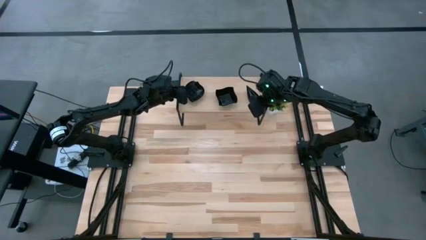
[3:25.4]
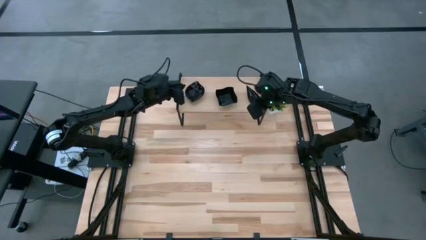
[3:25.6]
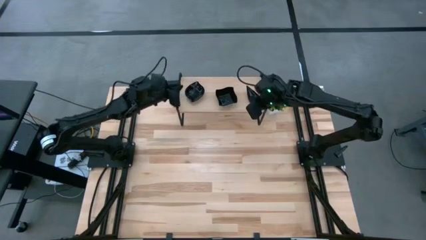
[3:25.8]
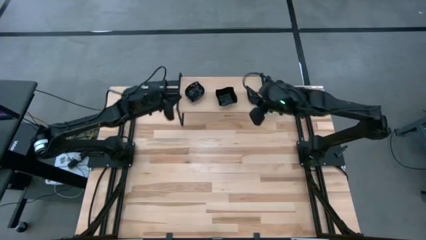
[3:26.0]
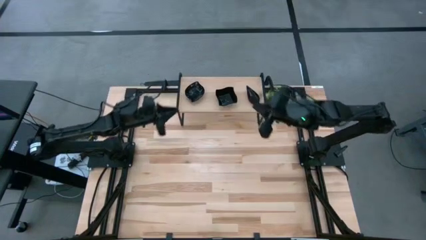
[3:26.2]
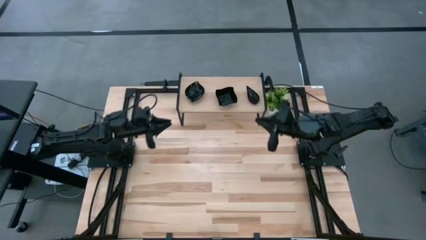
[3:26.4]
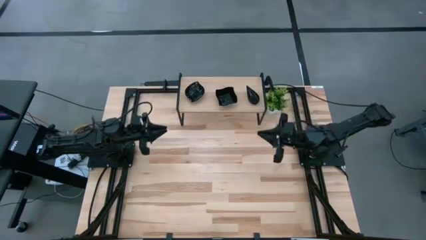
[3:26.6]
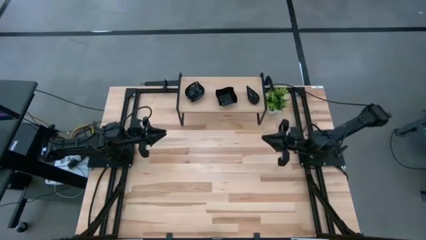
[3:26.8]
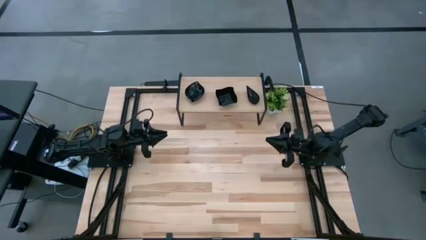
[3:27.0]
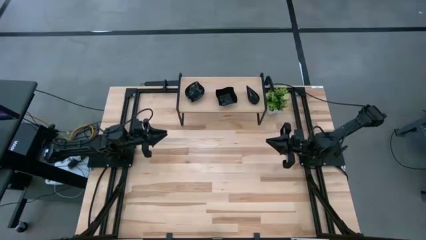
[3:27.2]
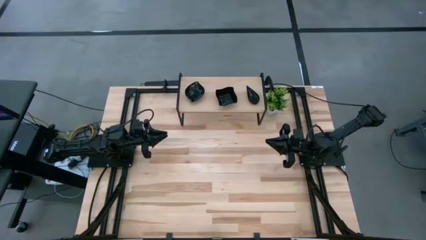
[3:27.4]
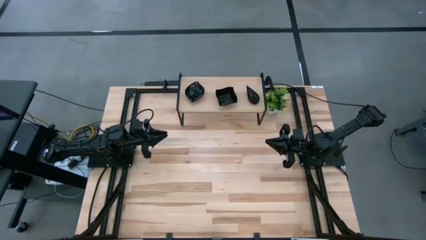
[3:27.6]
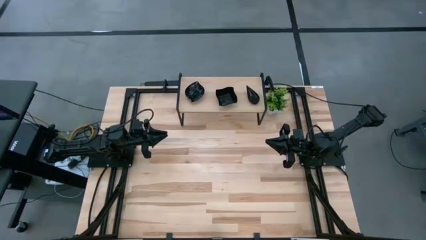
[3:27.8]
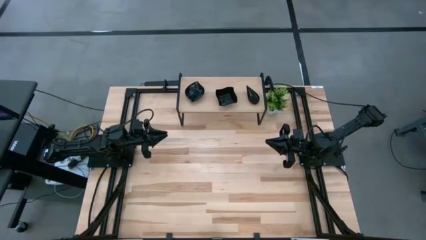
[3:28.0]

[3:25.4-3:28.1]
Task: Pick & Place Mini shaped plates
Return to Home Position

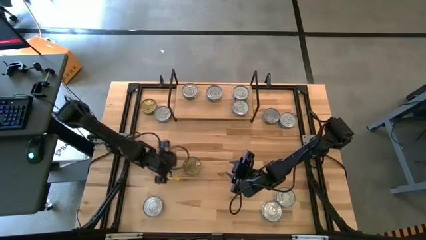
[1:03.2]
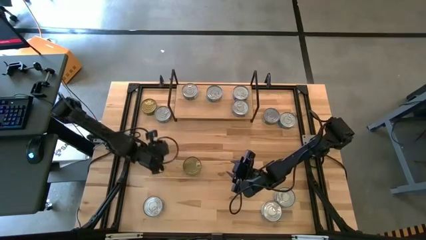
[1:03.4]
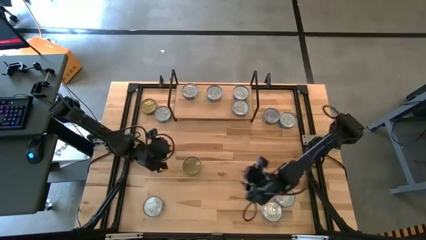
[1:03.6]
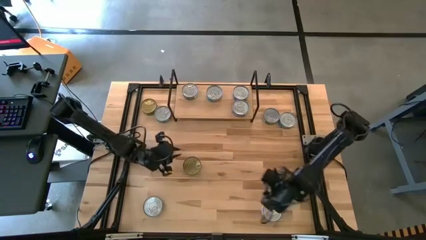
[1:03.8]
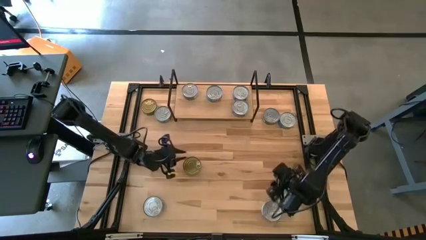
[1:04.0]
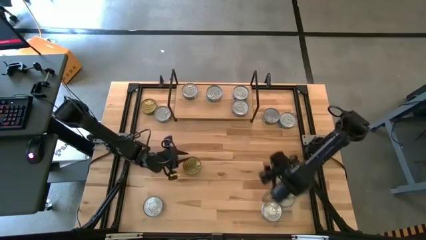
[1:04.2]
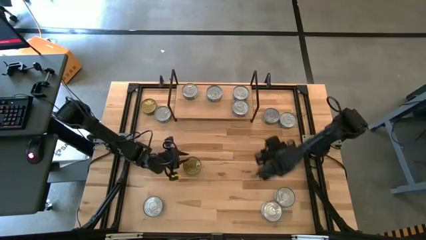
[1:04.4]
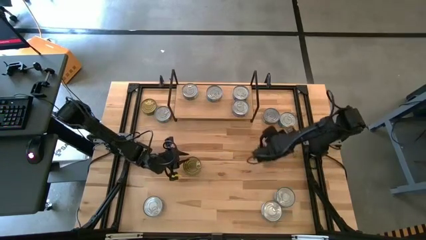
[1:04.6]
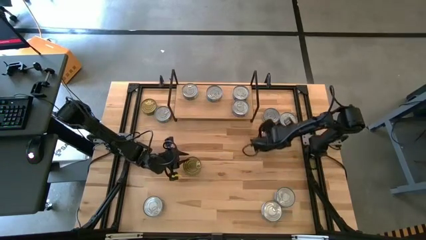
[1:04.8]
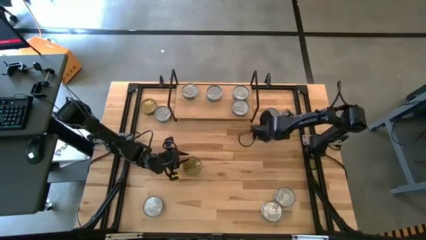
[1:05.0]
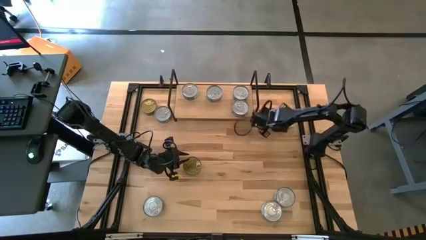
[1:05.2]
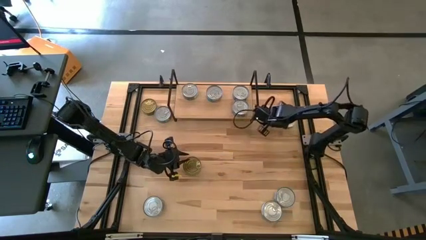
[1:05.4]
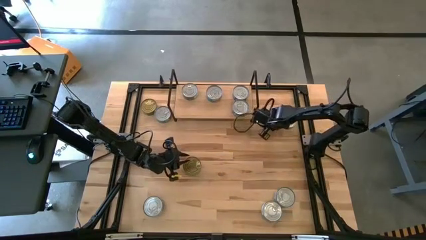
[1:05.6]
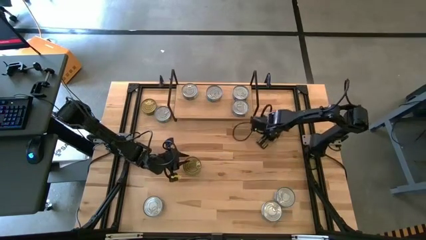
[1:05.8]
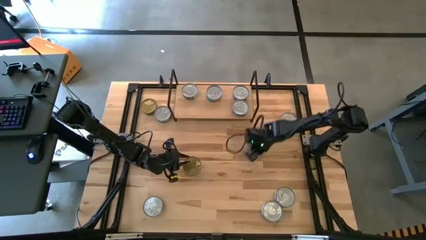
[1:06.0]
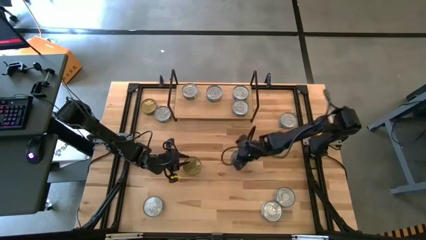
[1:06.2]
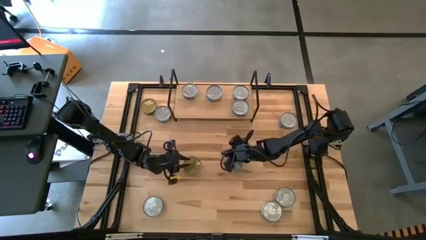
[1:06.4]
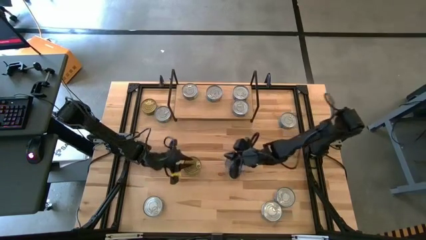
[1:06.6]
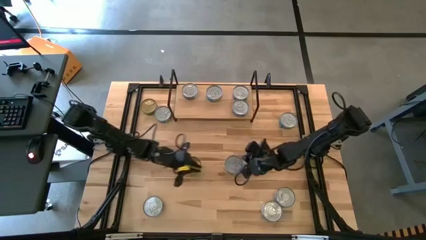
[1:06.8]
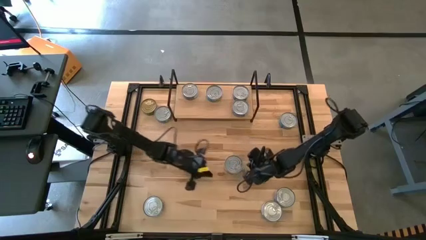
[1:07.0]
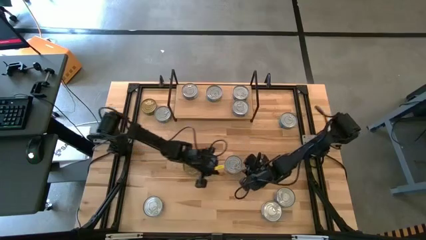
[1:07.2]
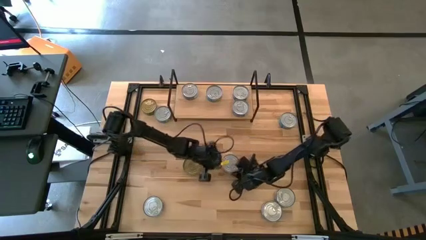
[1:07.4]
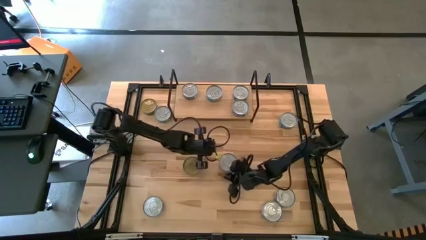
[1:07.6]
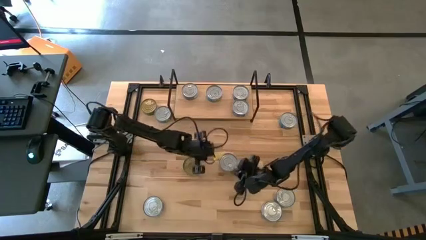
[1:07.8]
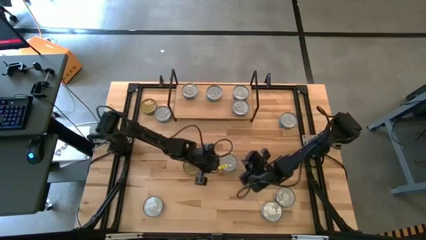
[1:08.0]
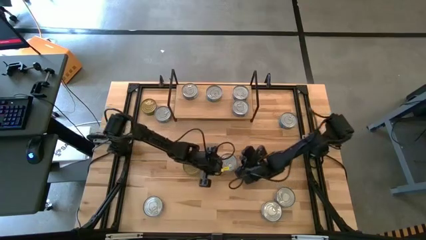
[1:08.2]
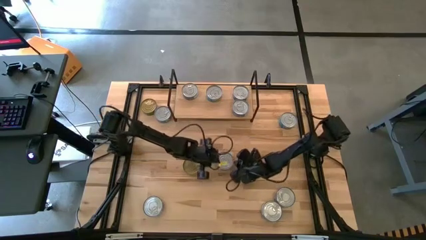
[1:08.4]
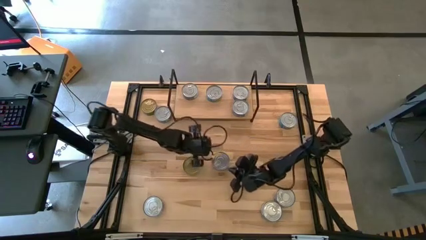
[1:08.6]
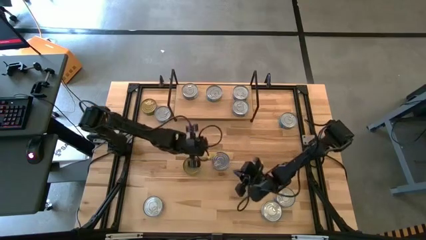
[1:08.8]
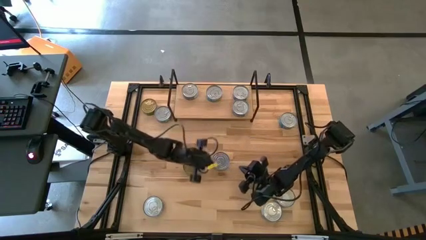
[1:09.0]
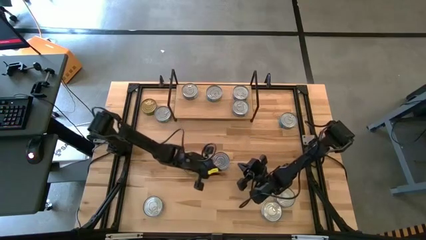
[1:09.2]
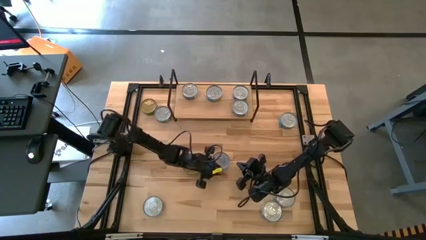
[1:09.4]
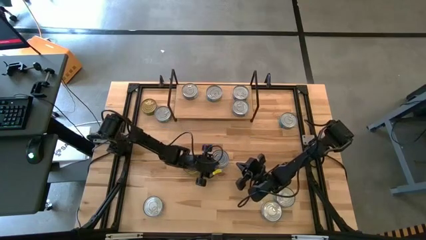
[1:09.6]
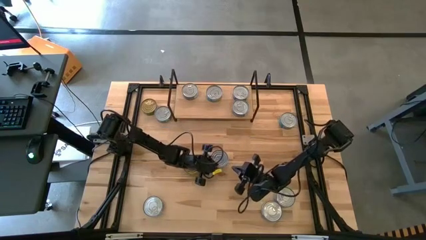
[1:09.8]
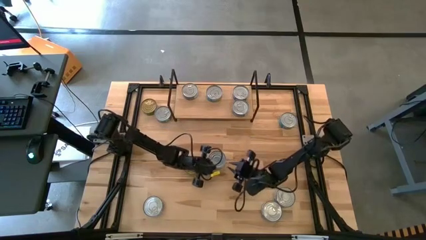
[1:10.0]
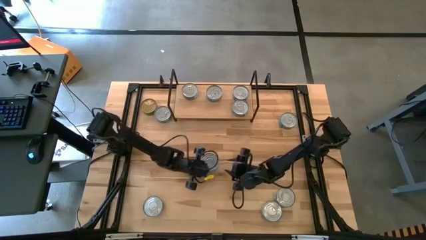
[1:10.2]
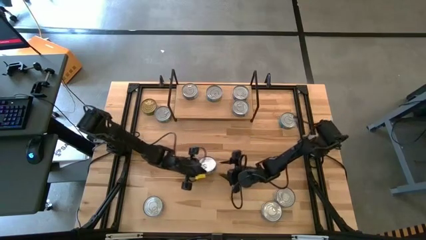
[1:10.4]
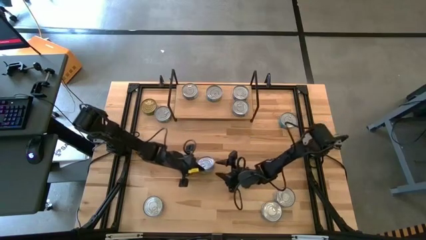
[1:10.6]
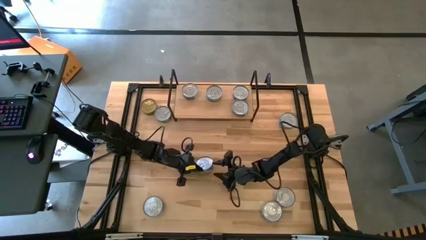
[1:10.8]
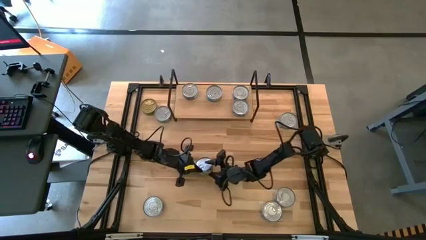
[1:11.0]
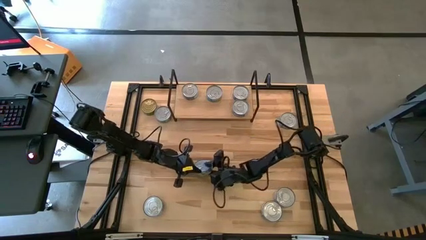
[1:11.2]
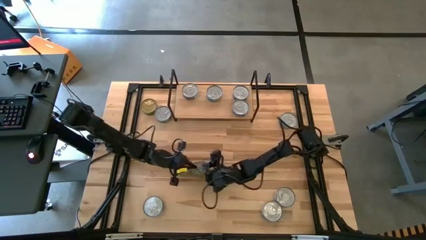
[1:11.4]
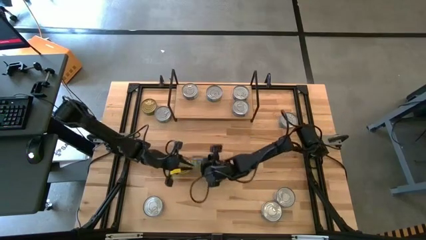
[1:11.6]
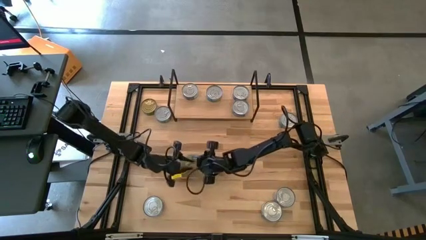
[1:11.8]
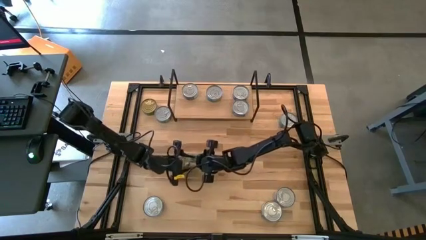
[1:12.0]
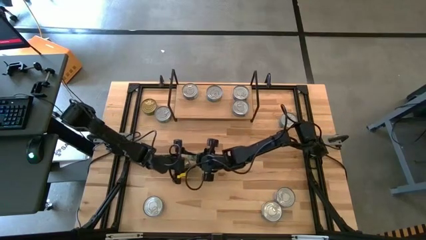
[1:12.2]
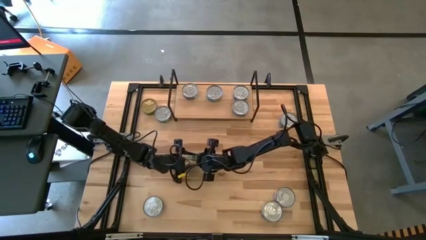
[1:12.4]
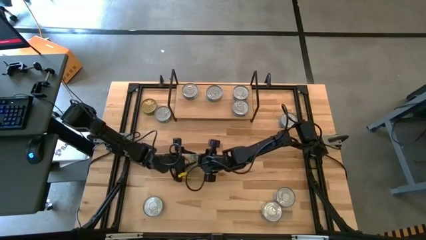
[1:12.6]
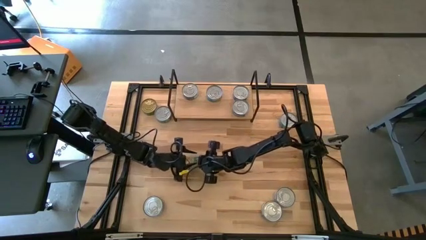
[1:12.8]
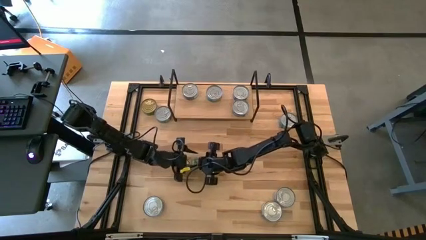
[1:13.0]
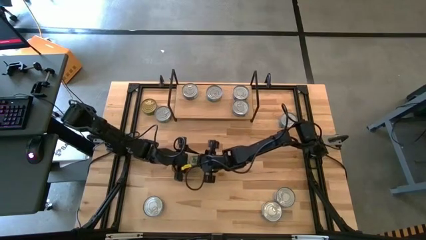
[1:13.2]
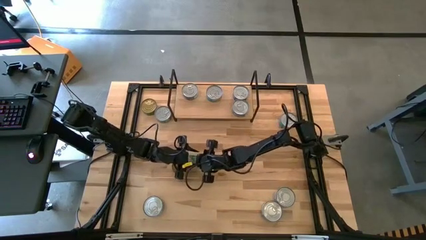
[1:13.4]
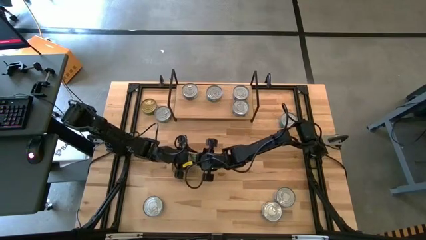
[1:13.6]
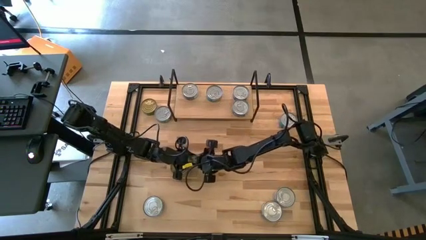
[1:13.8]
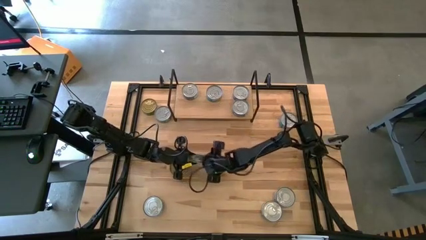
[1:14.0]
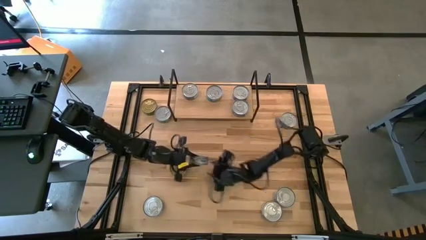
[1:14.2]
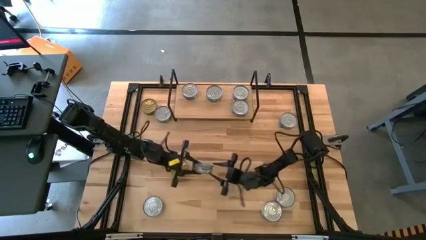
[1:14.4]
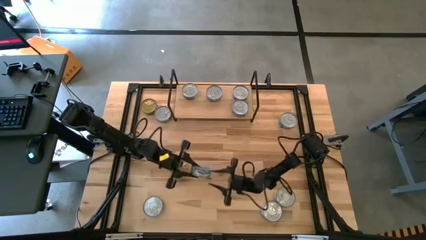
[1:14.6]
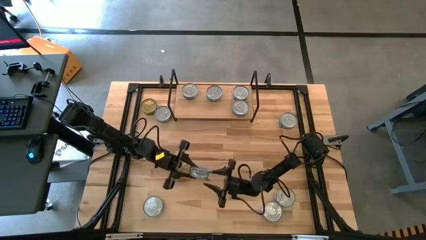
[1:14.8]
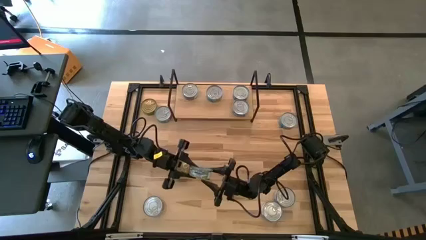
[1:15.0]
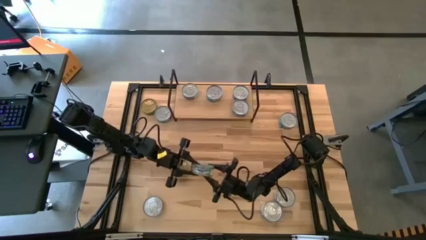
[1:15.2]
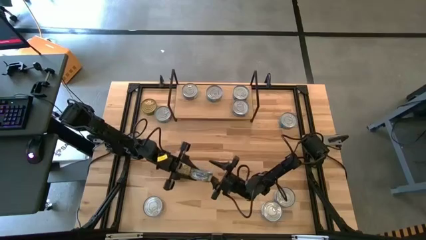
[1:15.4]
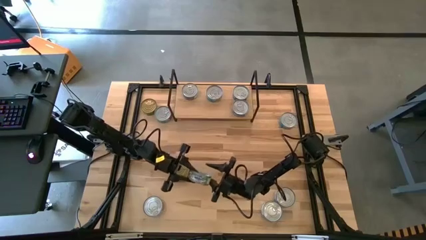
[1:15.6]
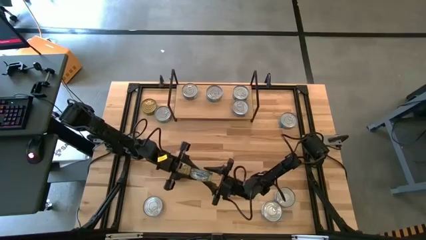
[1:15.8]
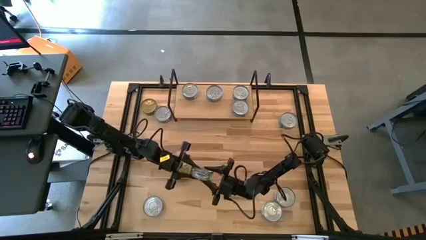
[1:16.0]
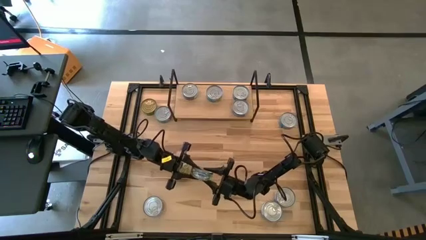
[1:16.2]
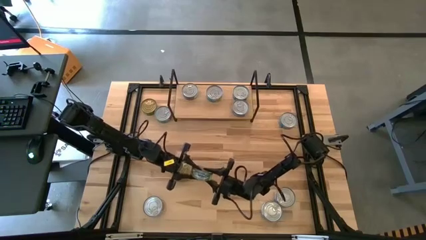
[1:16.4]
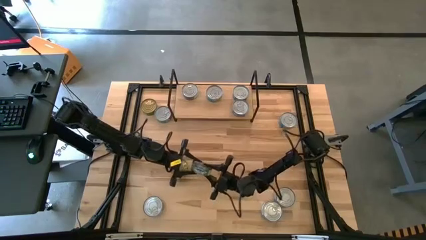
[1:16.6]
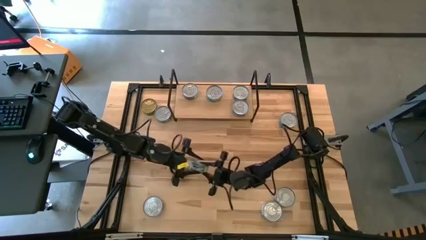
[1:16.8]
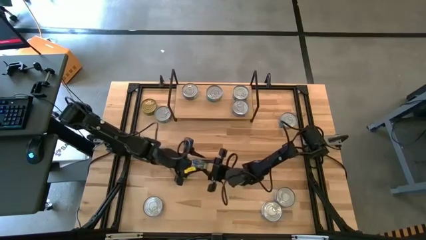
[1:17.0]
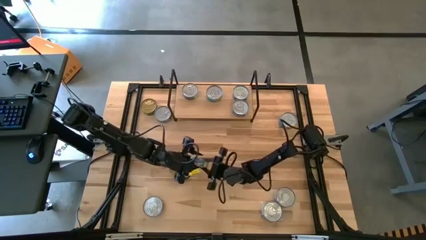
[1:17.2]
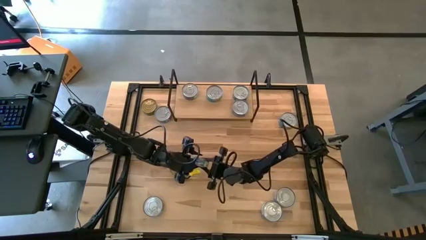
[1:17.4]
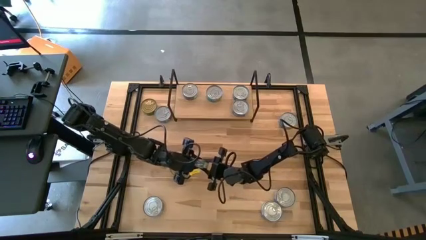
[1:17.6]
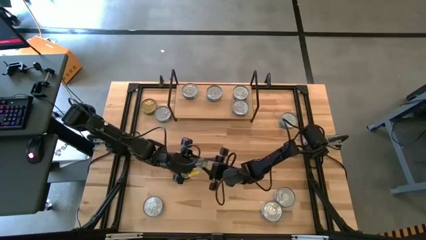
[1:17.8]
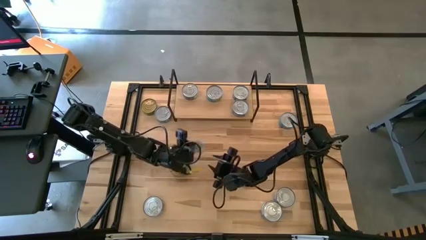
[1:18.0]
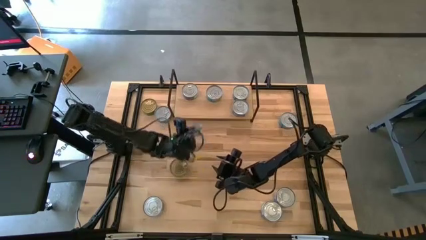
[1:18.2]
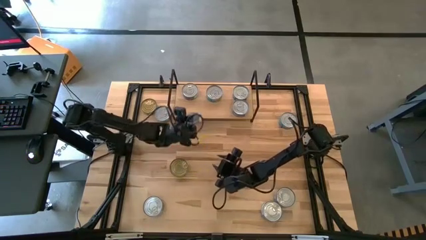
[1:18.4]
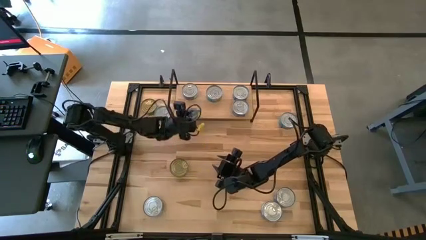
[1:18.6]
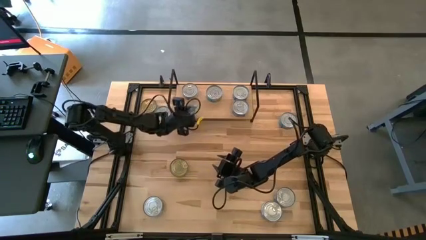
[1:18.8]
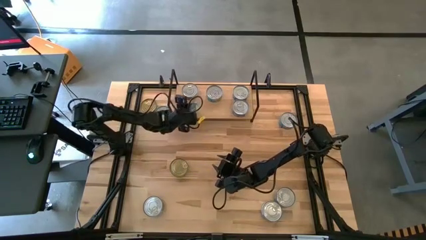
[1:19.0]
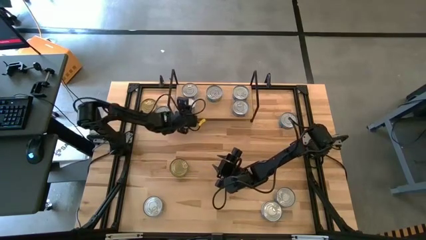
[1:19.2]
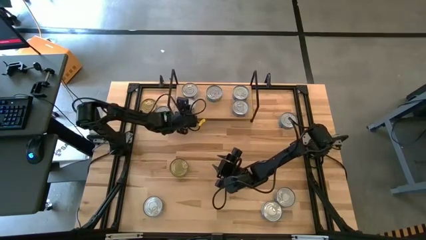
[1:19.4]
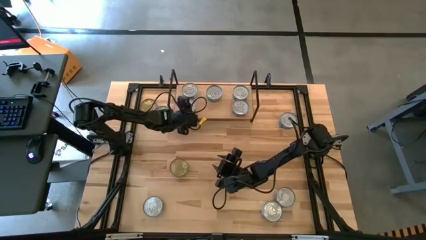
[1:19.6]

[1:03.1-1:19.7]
Task: Stack canned seafood by type on shelf
Put the green tuna can on the shelf aligned with the other green tuna can
